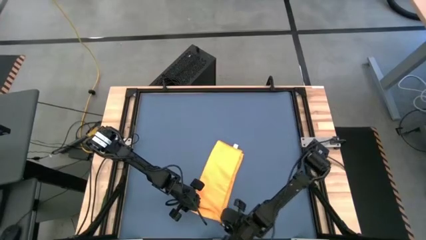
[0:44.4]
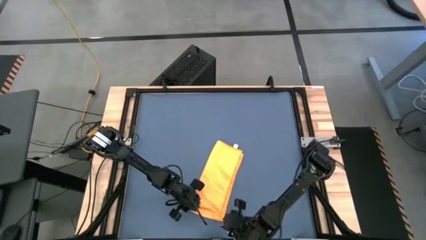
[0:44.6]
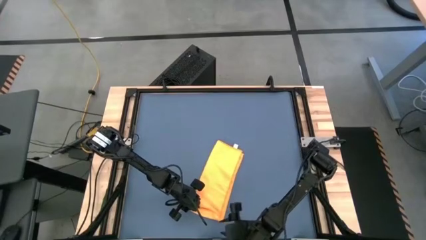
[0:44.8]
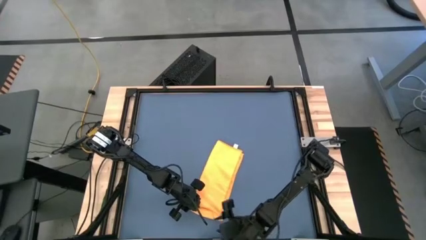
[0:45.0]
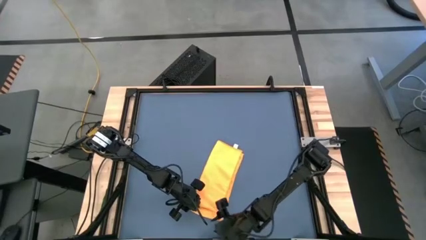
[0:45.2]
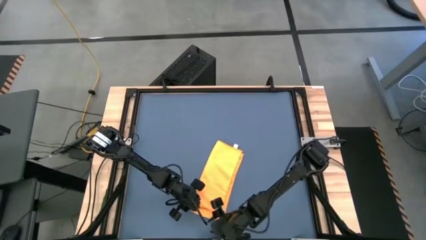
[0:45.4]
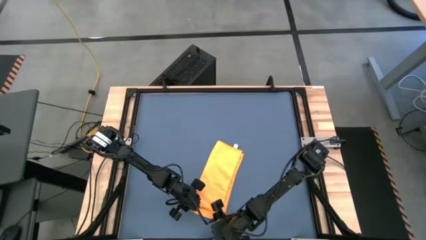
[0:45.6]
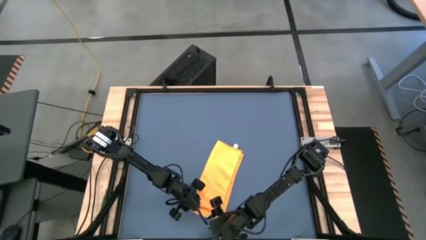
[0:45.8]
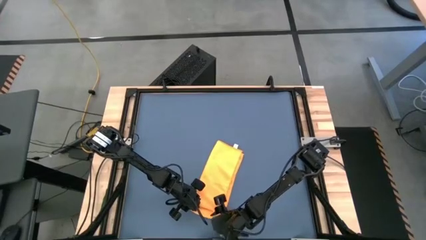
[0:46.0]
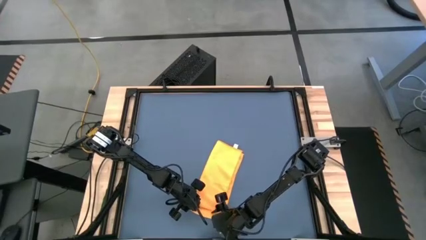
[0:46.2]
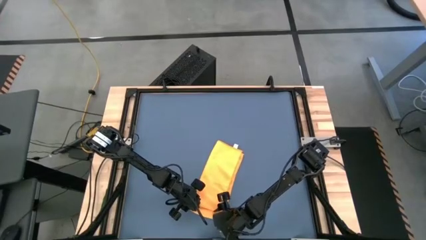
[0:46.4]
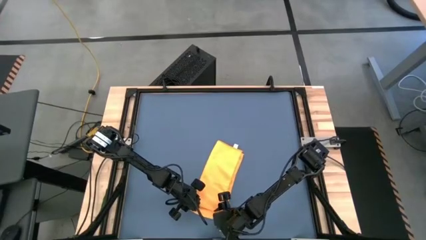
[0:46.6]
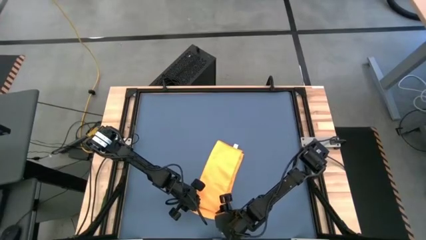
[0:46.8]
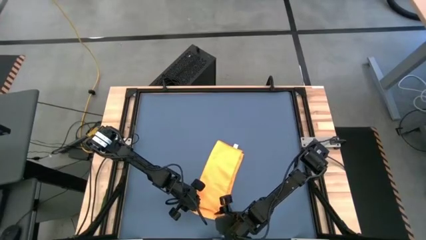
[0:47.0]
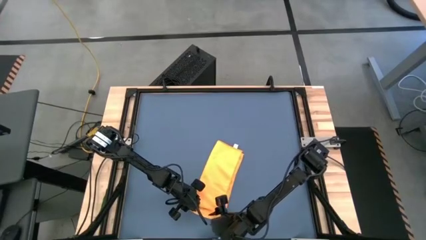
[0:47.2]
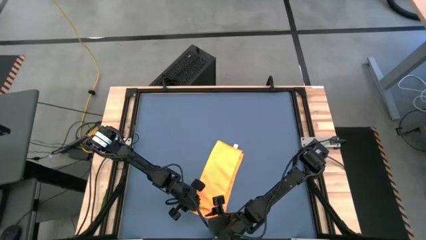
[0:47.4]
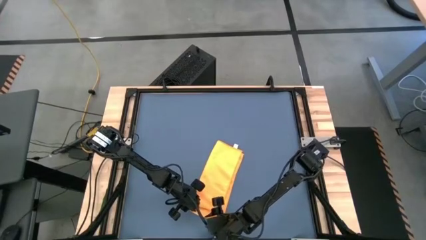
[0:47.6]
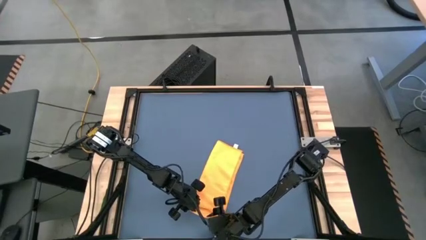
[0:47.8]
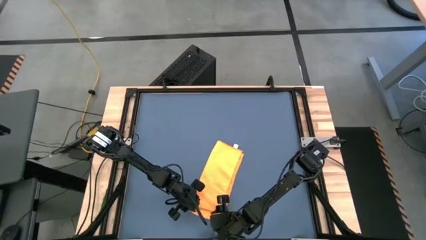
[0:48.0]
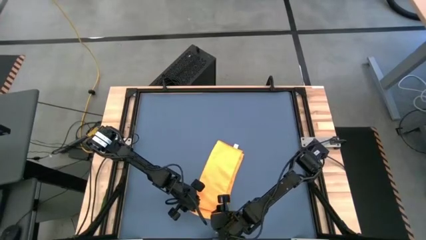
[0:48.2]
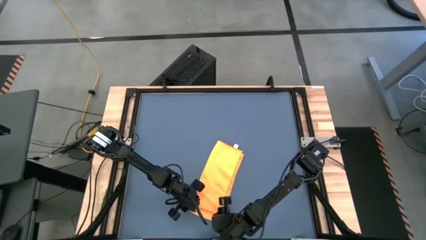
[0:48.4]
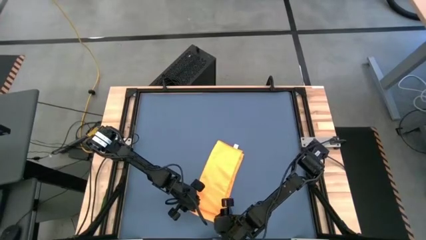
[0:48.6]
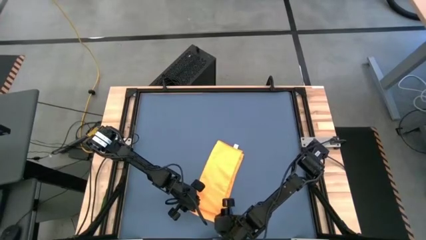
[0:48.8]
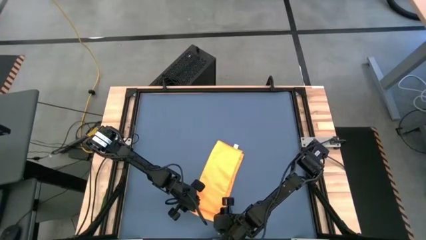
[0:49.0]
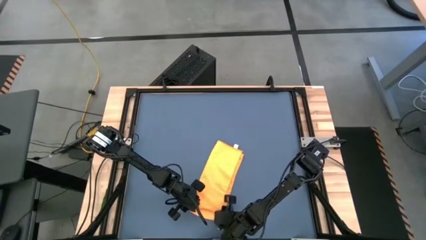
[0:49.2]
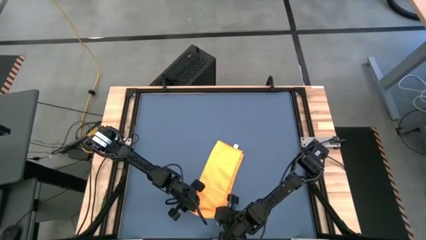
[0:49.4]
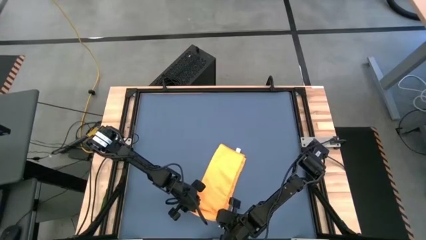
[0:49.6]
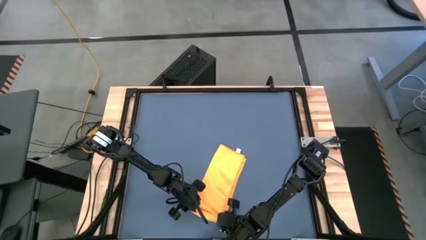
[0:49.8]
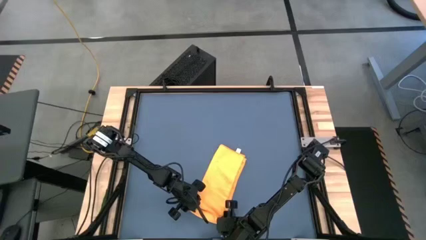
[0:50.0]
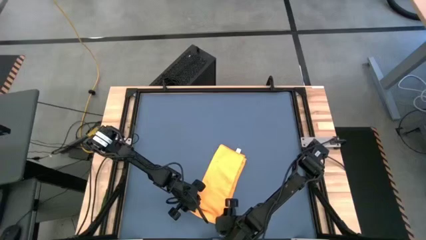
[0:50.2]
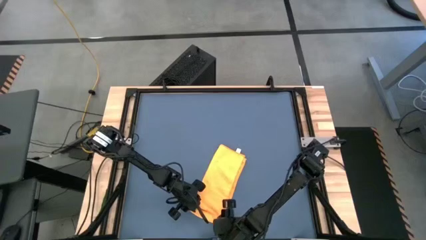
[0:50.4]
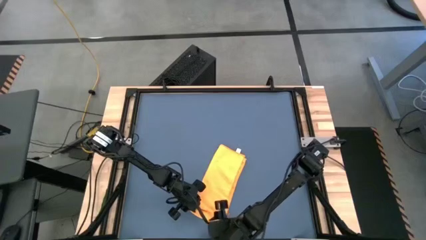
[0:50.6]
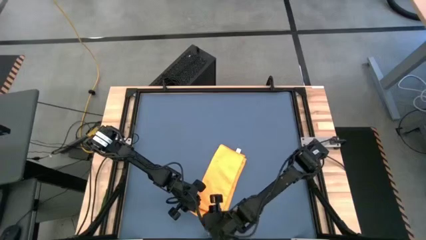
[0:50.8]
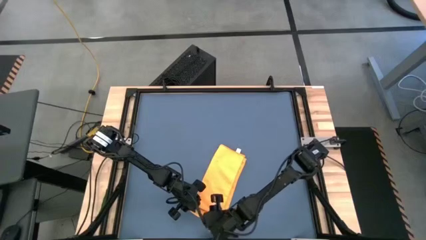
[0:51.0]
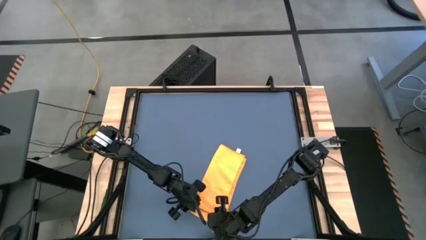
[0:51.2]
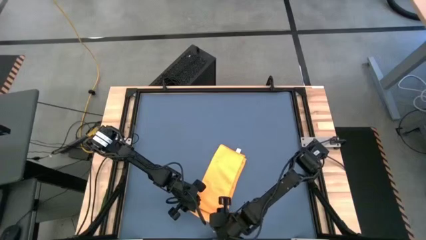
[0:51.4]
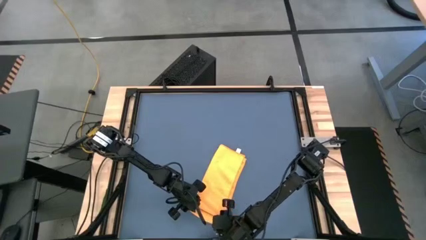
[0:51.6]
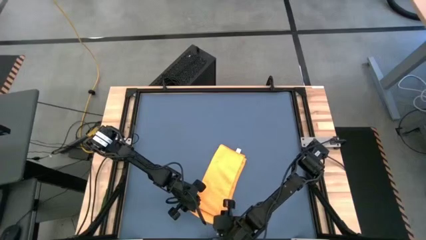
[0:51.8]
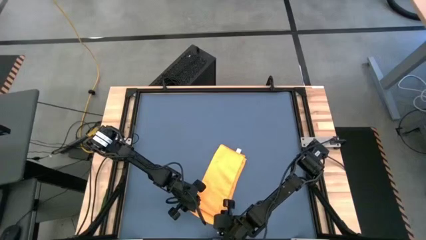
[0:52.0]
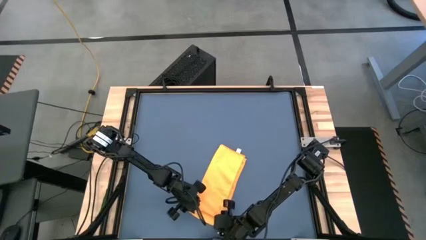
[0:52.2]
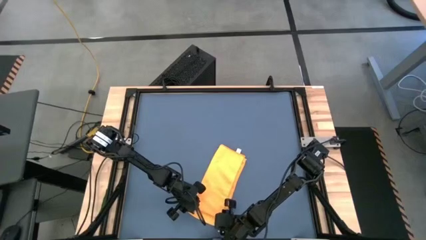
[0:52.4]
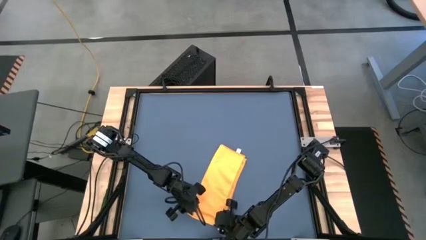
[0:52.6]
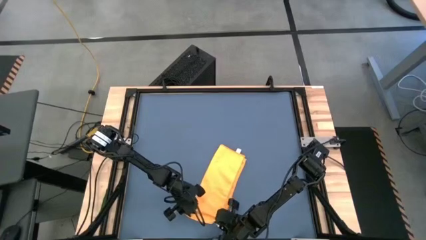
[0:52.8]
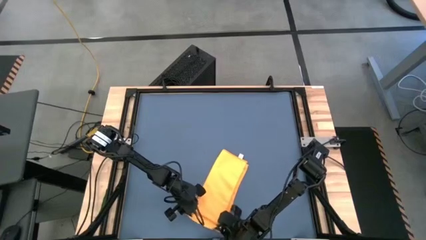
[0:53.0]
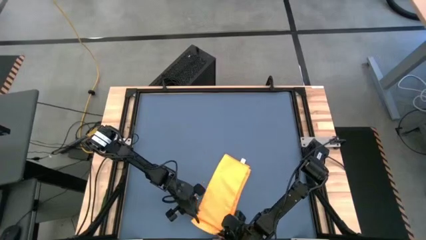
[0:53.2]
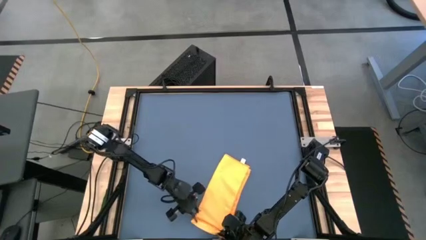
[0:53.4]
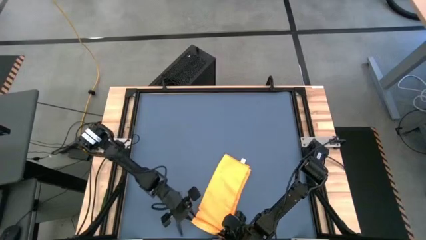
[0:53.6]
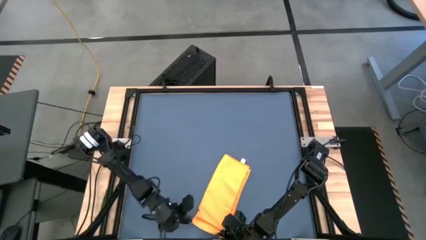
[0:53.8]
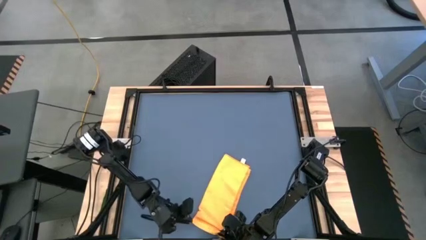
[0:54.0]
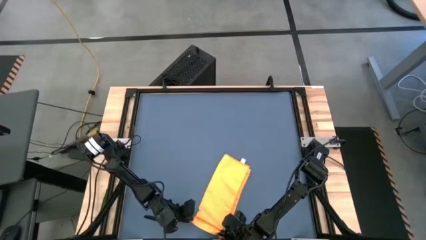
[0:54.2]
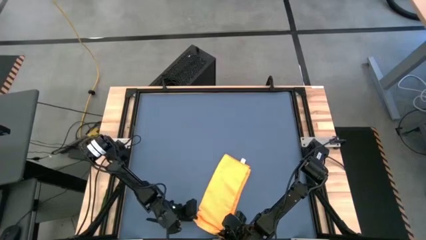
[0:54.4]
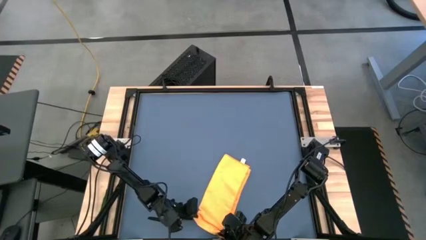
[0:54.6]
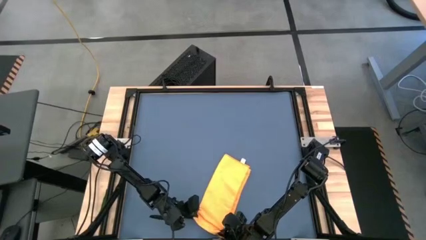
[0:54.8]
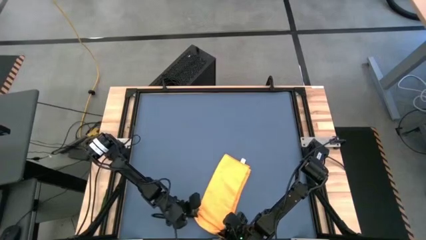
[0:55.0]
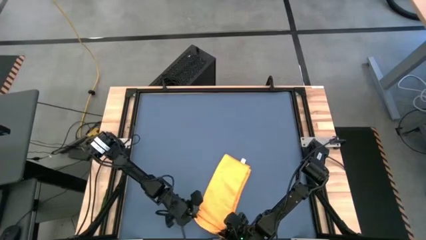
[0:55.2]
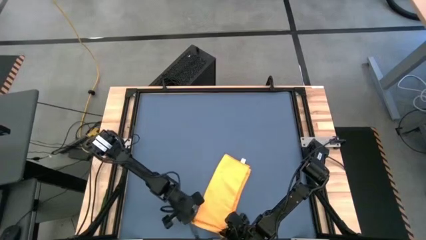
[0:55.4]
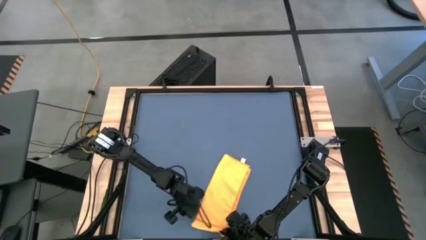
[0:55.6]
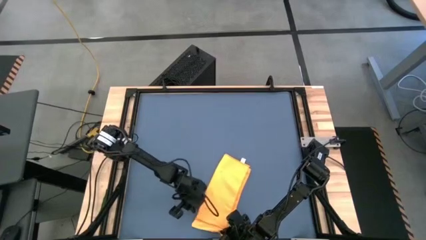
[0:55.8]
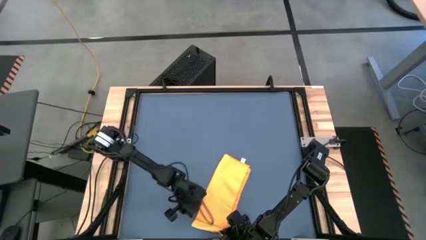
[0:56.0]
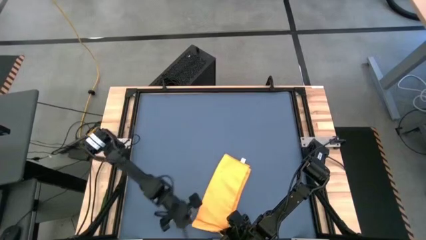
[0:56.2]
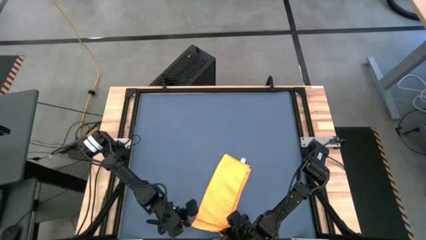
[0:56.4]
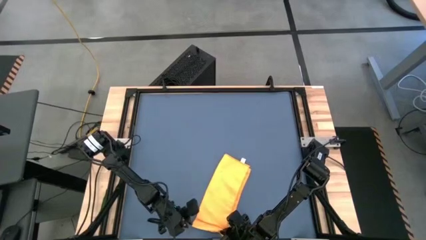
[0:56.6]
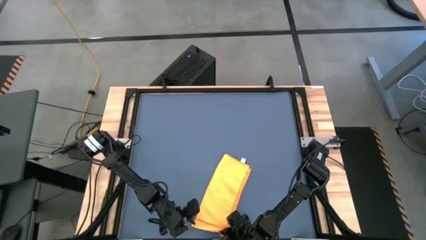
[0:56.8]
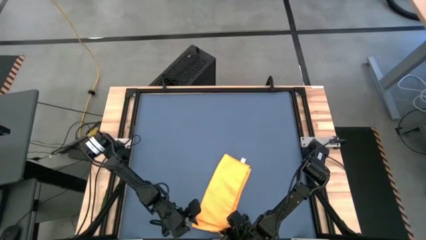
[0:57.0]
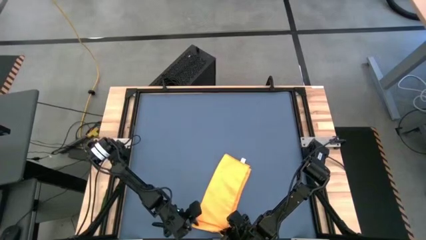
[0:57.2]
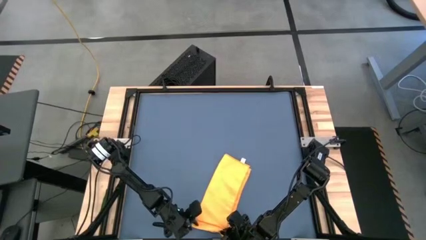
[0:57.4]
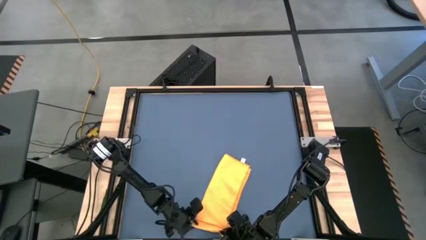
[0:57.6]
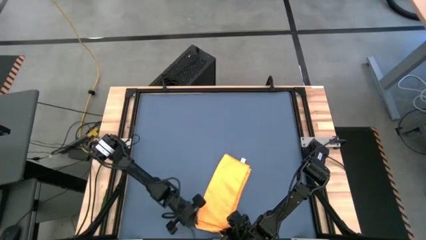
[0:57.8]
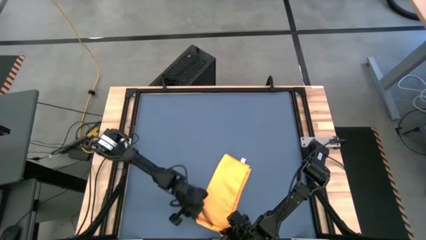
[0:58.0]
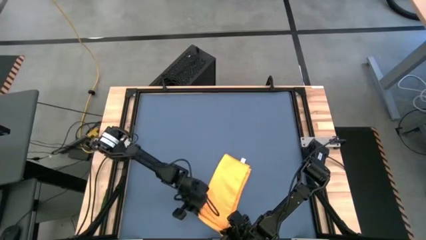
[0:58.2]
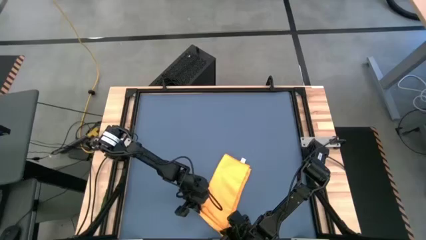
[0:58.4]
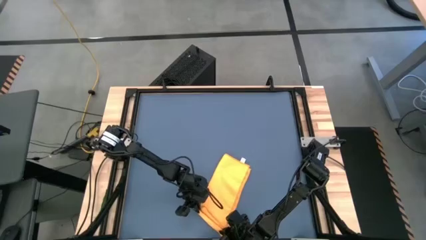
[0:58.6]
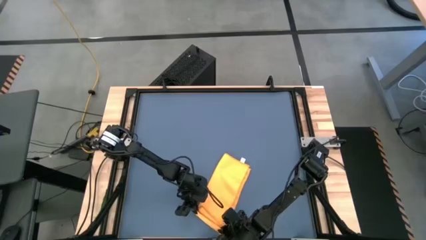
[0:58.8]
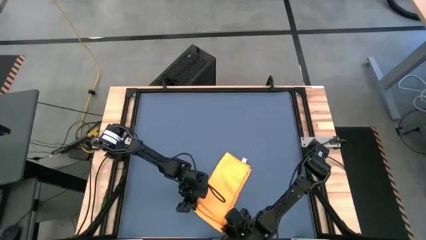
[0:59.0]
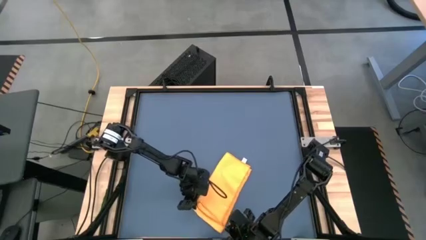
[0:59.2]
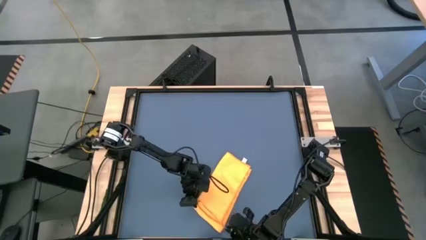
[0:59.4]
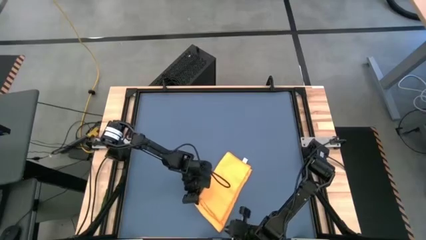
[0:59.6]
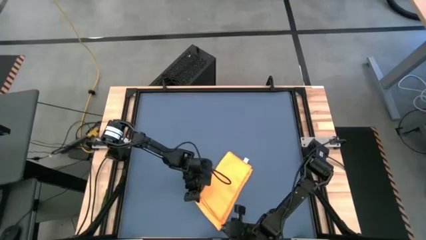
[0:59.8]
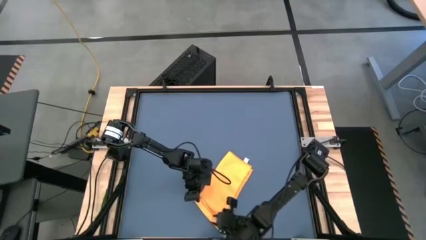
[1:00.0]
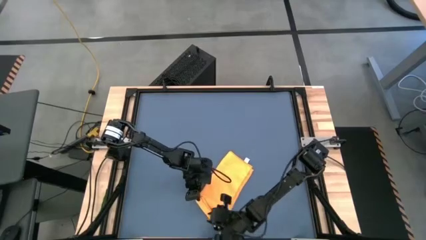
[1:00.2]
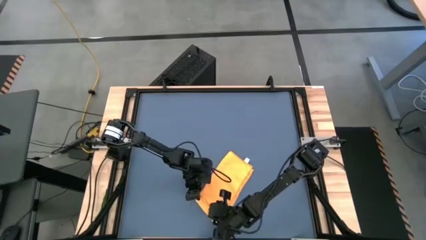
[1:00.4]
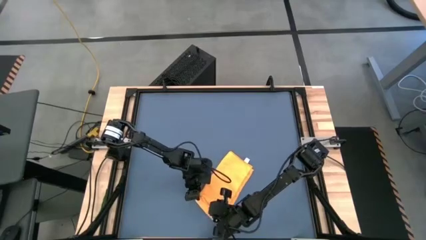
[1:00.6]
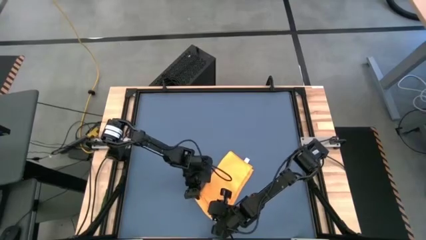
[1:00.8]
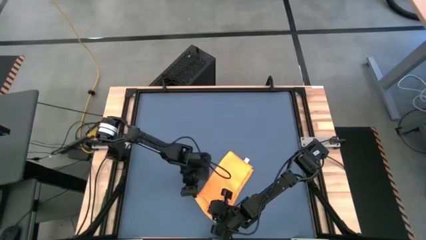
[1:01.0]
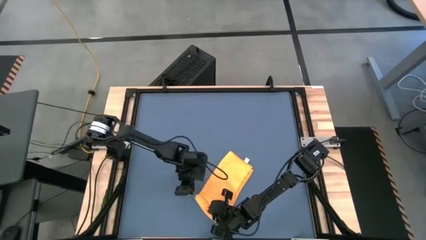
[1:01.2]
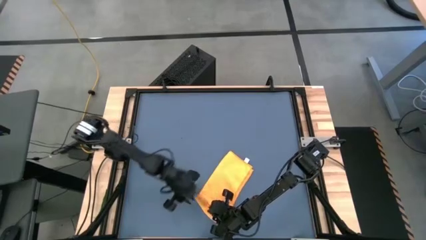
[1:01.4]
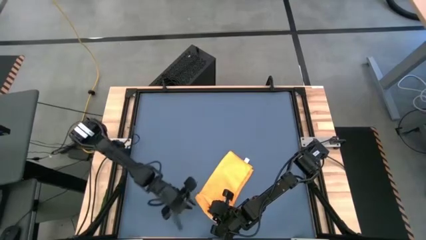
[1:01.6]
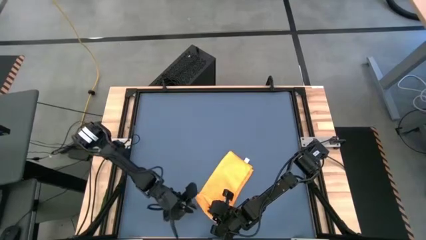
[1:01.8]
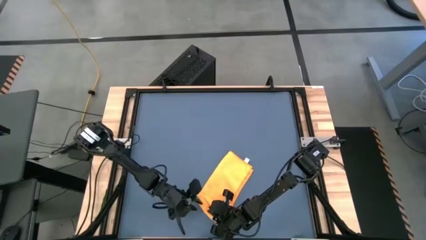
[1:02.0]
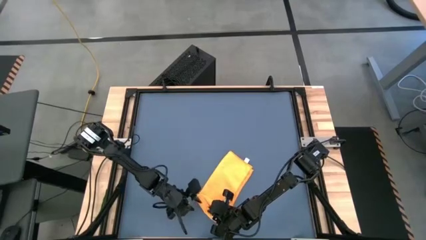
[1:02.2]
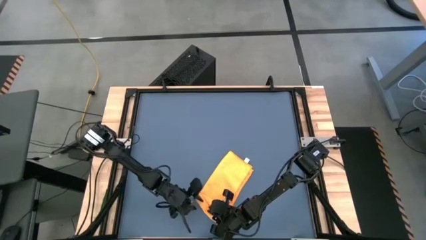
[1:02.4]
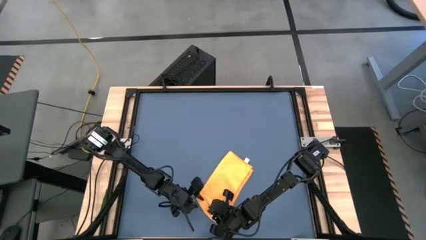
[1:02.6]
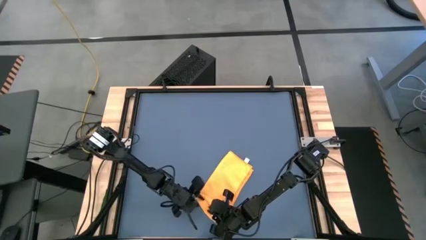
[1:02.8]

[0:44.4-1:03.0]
Task: Roll towel
Roll the orange microfiber cloth
